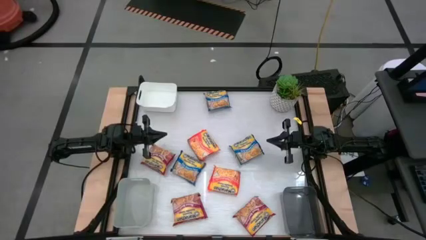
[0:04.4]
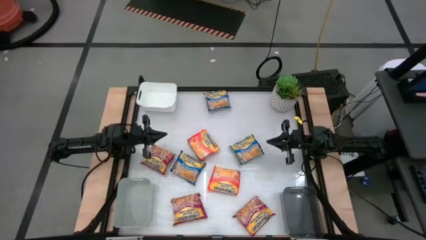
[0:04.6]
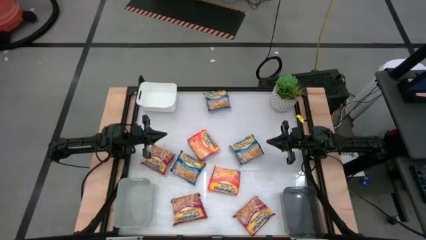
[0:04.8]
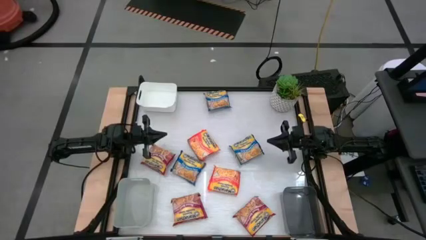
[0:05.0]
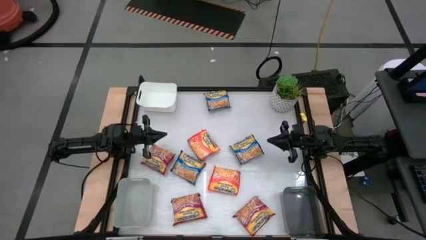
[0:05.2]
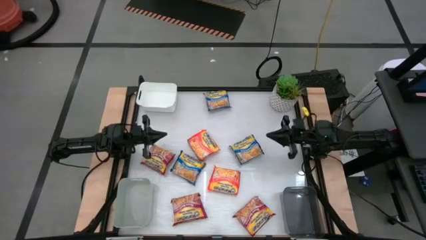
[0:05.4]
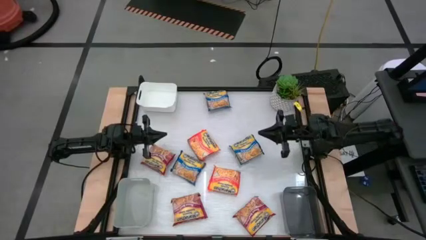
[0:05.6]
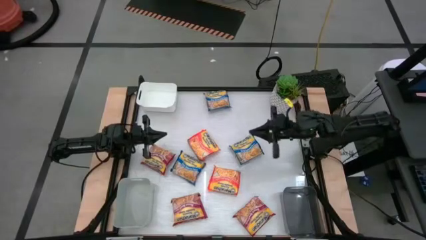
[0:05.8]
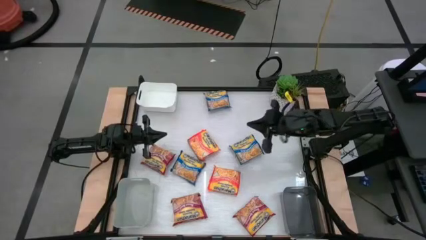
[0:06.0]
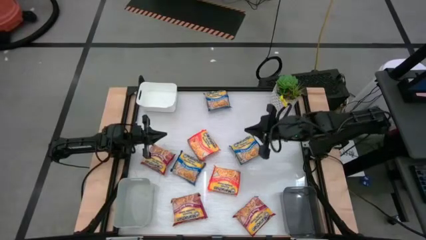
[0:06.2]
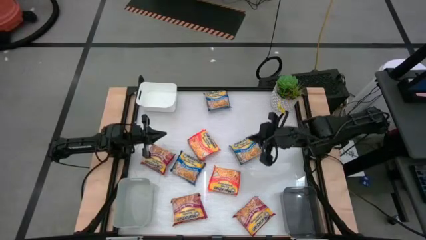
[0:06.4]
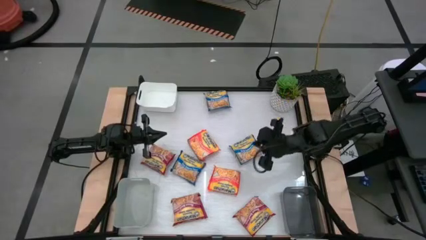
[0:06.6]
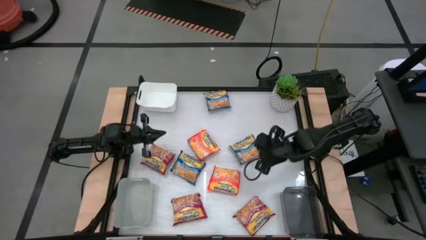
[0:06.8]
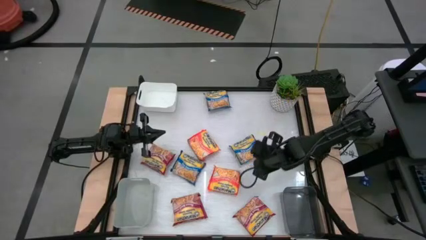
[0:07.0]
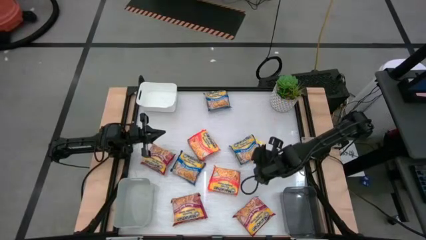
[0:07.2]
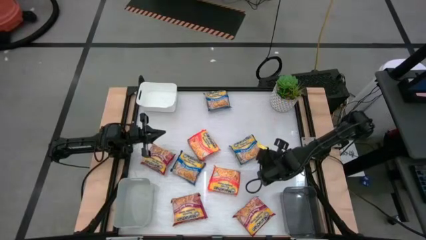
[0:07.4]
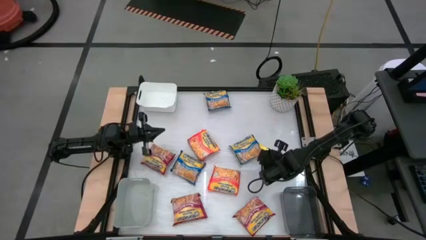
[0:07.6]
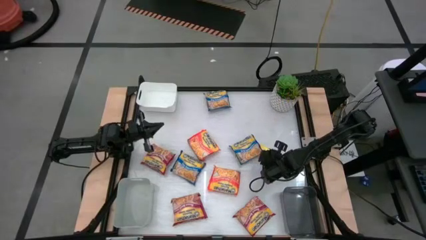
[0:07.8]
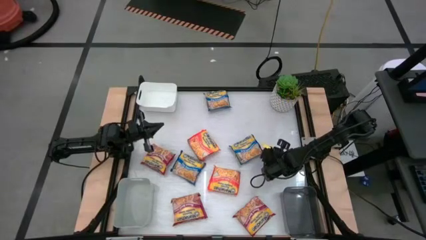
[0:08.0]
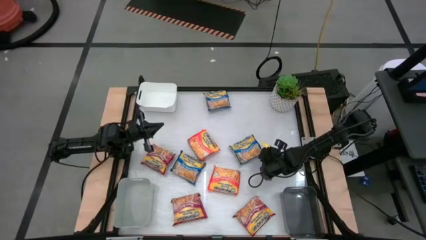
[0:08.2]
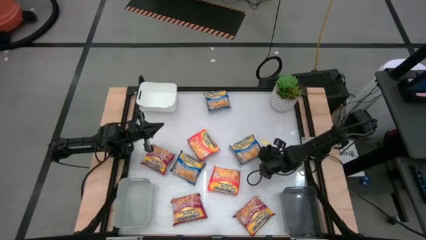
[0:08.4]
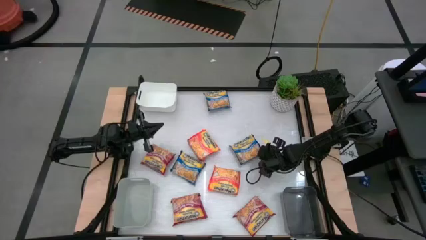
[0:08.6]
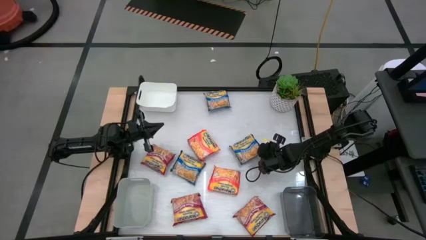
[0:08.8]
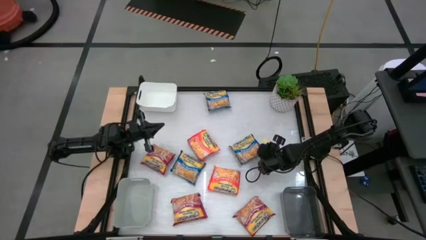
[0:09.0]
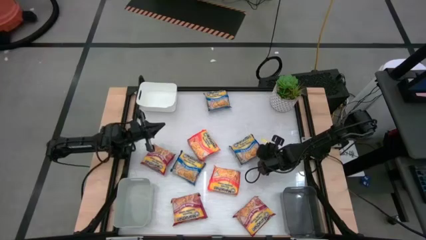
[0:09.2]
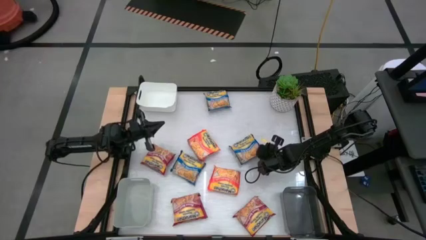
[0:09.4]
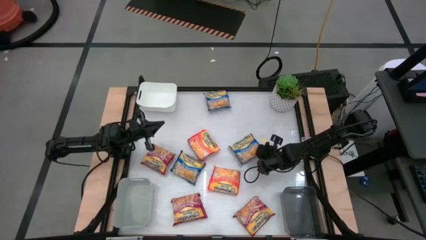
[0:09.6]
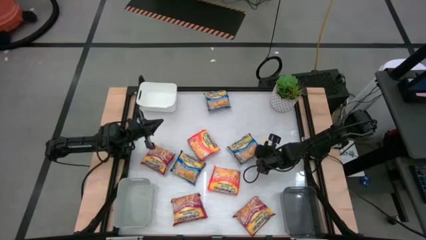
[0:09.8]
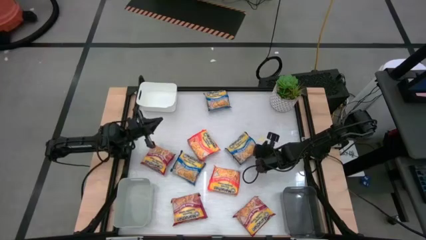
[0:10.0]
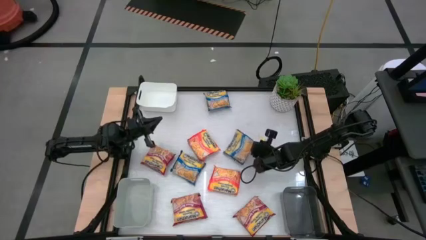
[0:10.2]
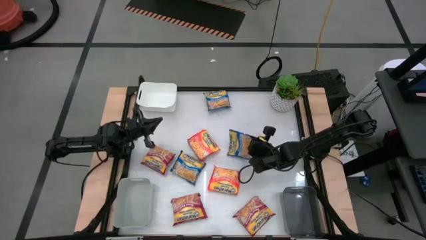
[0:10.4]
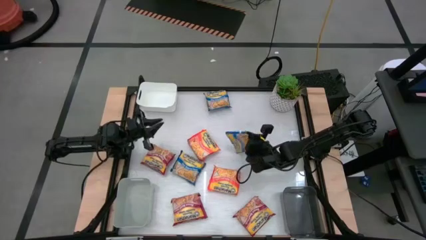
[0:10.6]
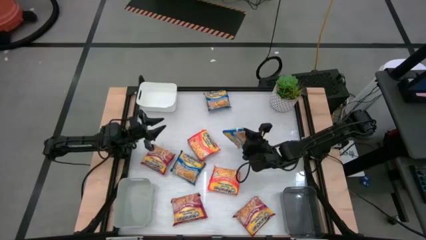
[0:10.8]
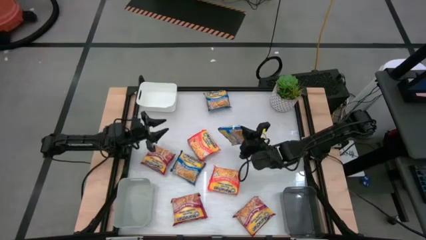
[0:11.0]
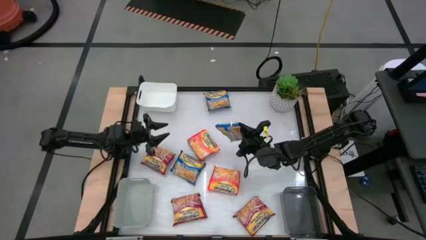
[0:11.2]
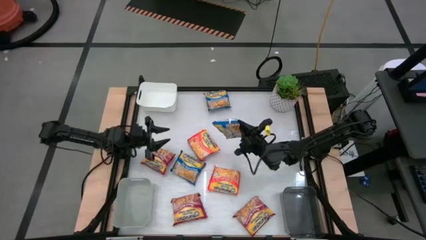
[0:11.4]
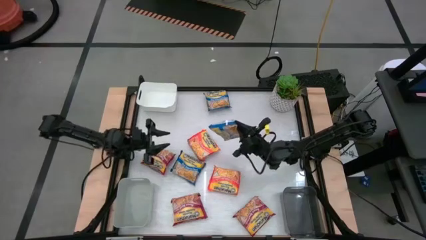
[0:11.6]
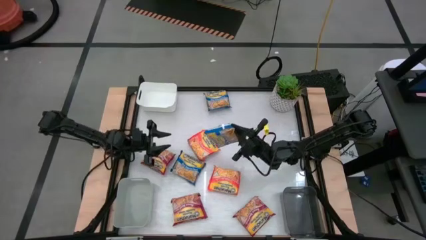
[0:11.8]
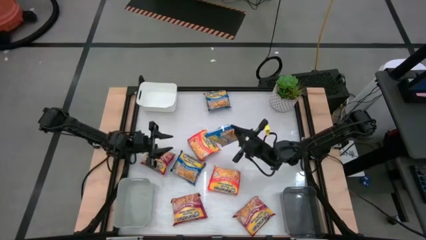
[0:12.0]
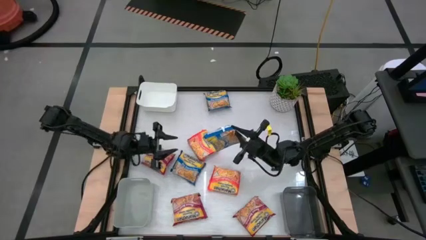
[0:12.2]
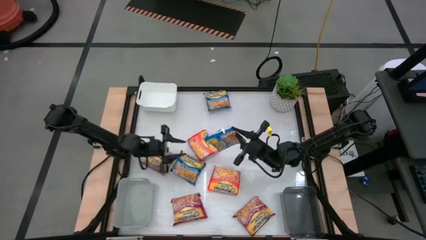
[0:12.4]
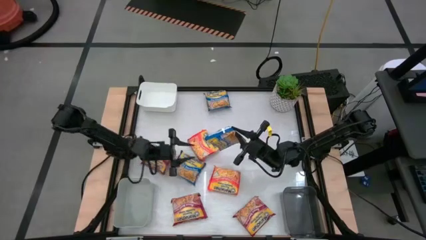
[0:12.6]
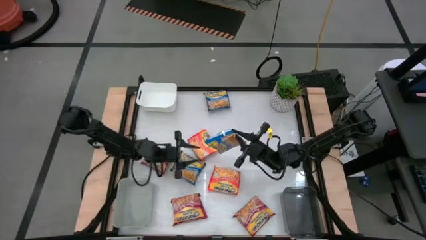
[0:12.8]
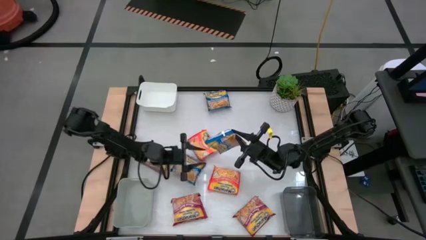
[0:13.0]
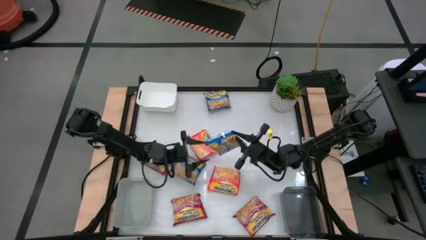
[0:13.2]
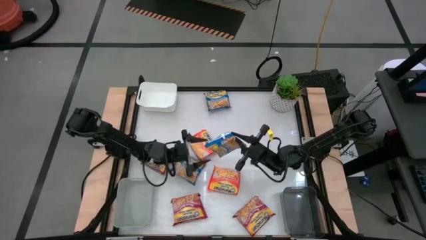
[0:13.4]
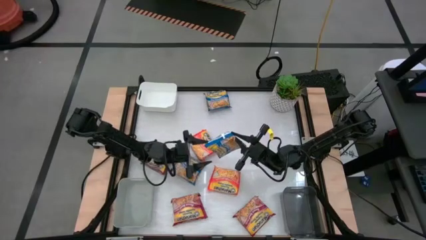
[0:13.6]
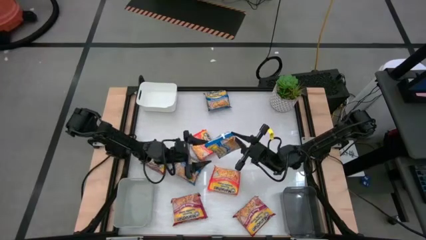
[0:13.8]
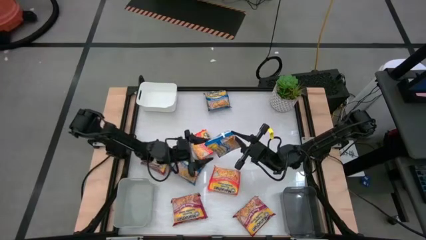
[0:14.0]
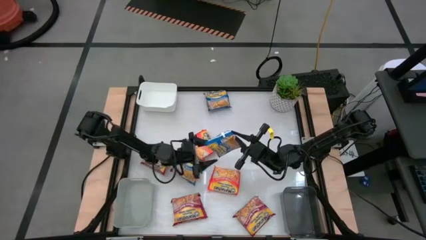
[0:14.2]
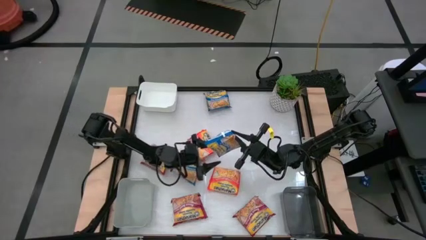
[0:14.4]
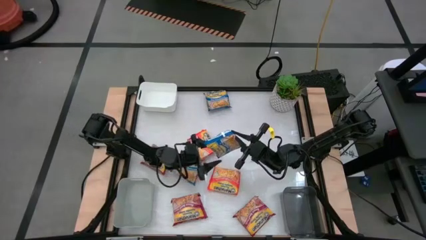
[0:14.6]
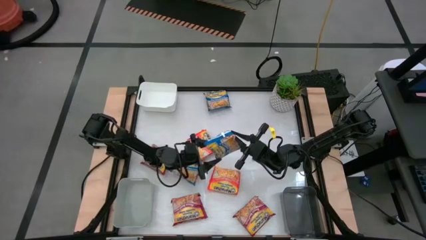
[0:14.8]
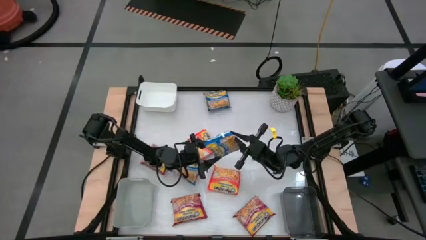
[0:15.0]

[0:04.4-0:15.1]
Task: Sort Maruchan noodles
Put the middle right blue noodle pack into the black bin

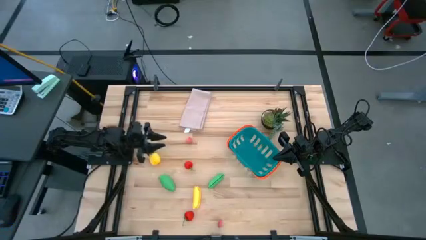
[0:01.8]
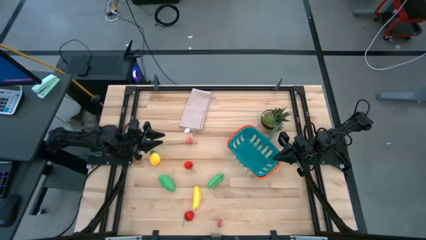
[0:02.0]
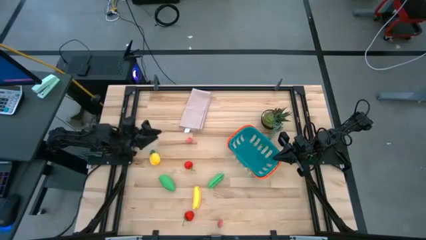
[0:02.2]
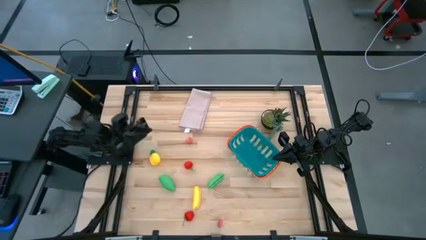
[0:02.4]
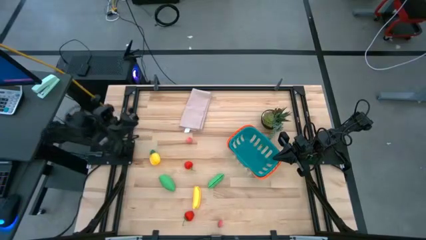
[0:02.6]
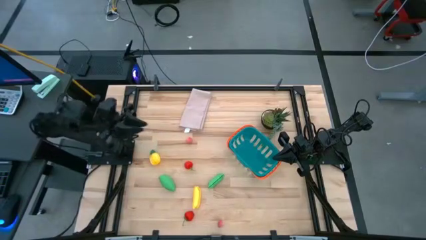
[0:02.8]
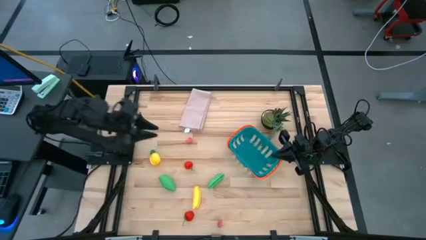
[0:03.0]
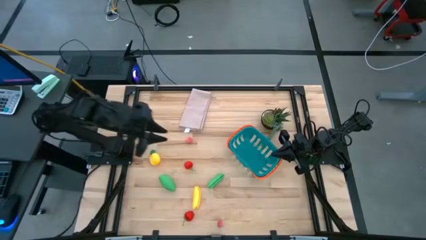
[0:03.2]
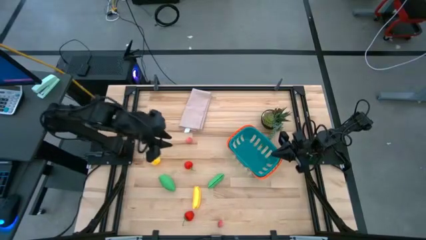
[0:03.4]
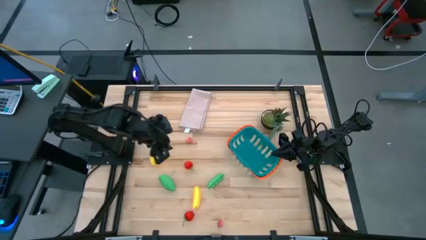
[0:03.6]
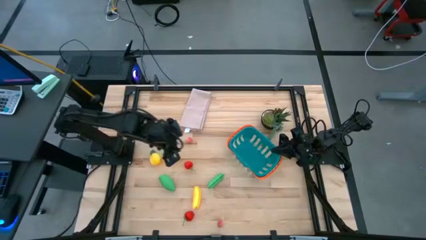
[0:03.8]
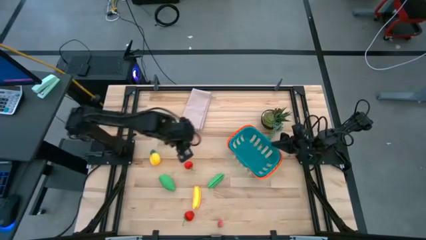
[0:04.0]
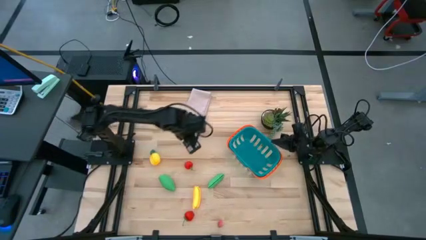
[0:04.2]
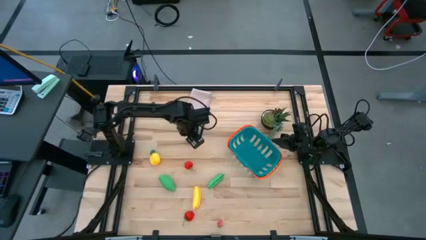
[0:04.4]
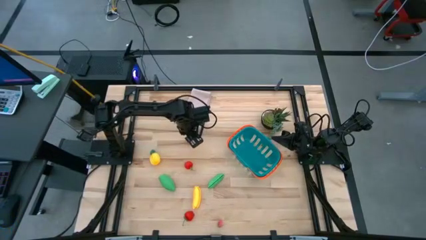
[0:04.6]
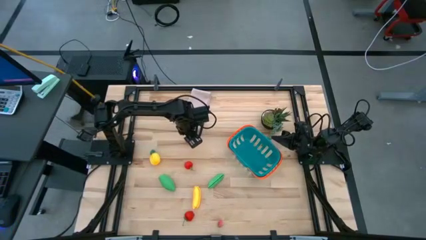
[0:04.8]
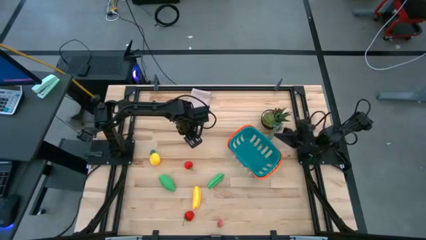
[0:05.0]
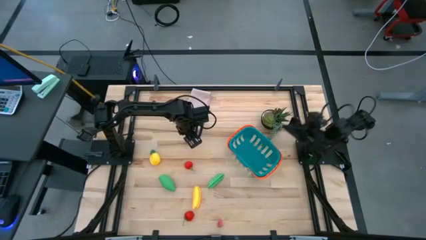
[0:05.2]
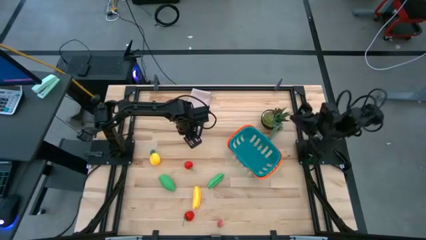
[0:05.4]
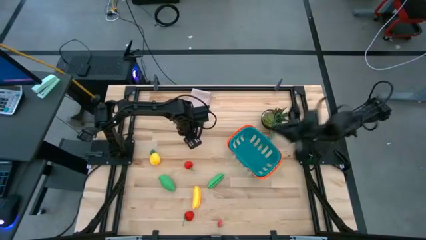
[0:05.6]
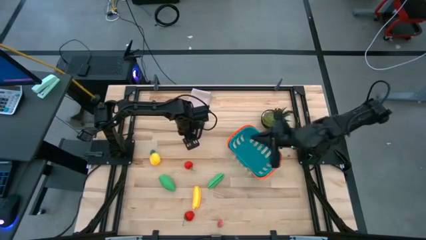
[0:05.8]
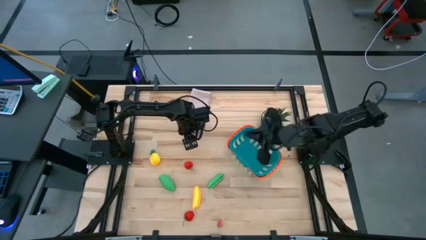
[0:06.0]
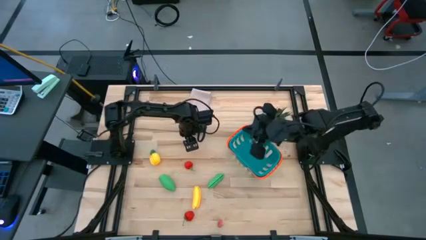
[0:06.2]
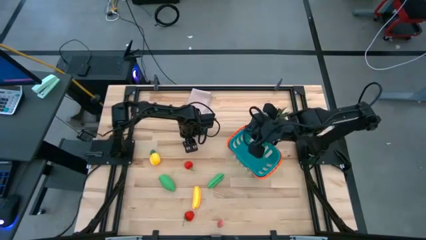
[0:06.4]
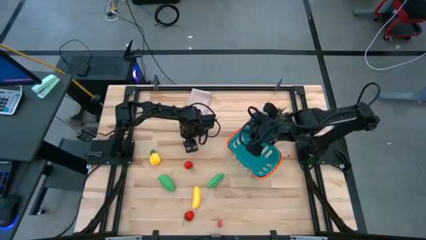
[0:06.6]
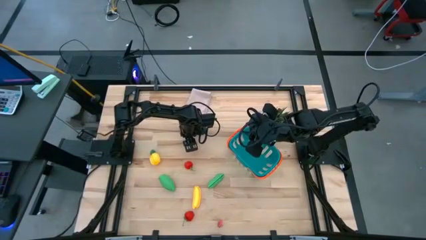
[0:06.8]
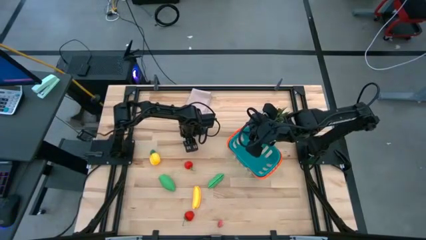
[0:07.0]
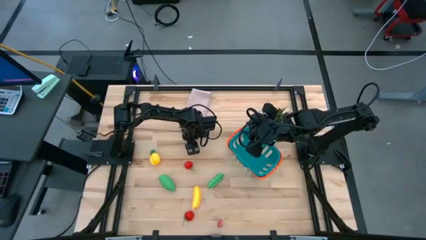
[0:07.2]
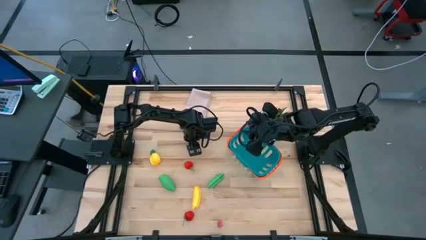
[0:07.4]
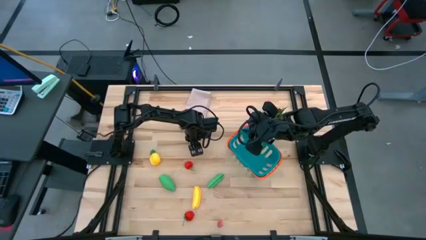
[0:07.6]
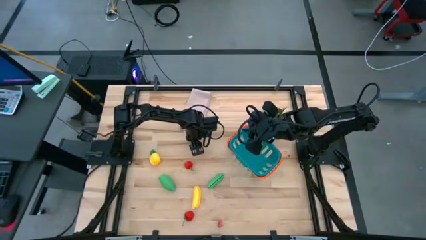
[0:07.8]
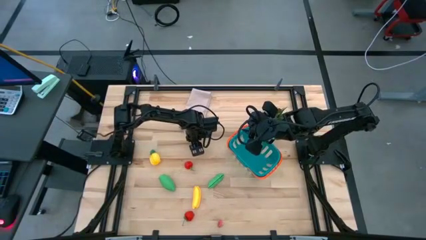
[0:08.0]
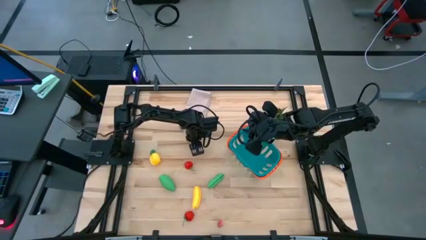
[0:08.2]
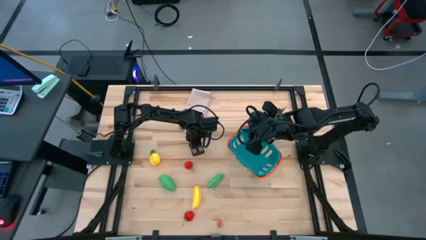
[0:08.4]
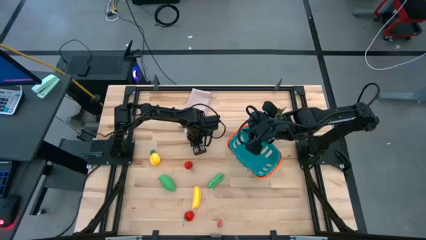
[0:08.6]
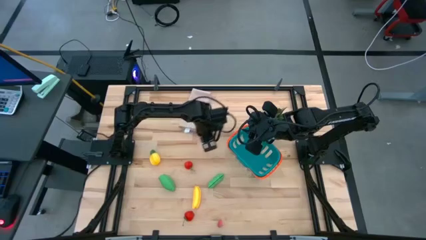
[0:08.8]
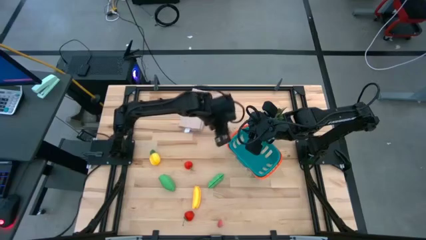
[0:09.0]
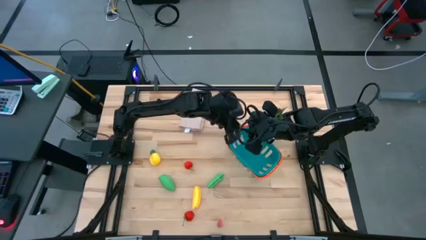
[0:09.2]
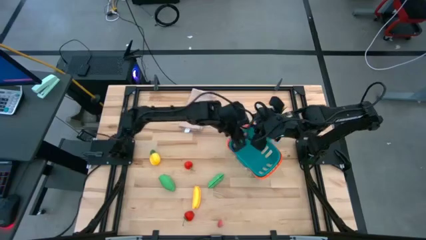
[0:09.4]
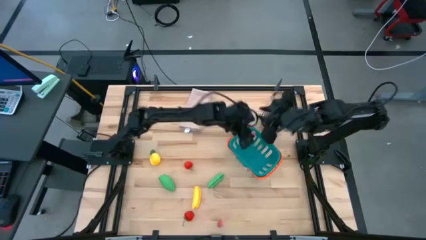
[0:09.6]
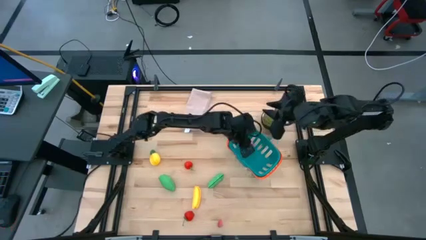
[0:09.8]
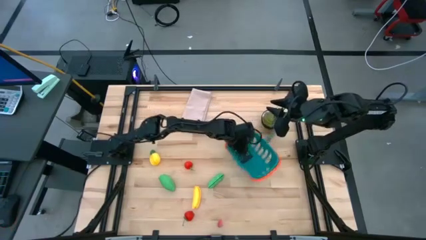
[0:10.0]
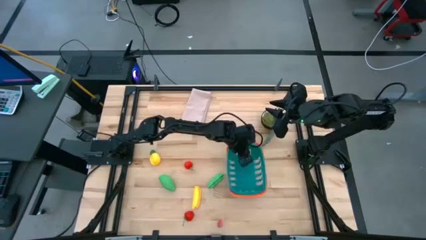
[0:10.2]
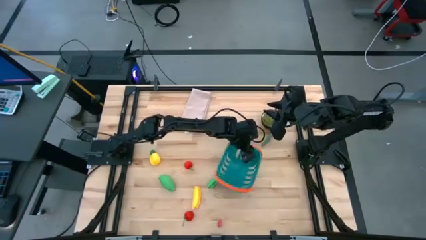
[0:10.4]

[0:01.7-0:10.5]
Task: Pick and placing Produce into tupperware
Put the top pink peach into the blue basket
